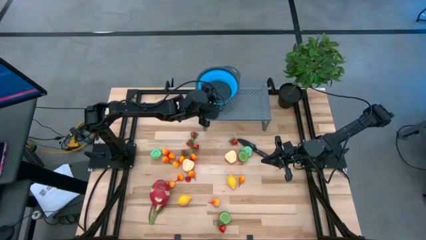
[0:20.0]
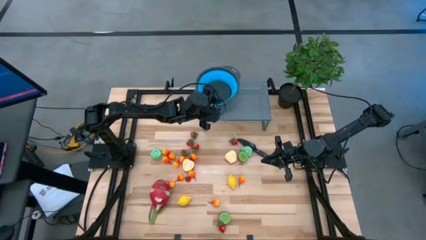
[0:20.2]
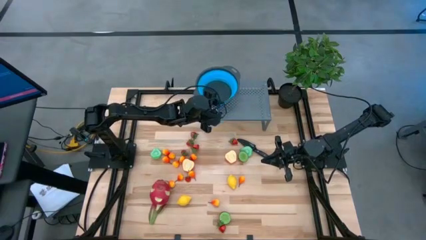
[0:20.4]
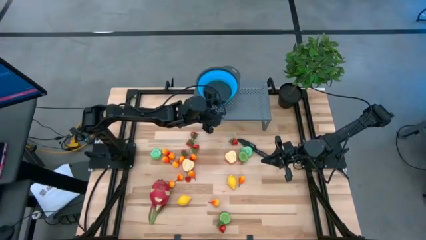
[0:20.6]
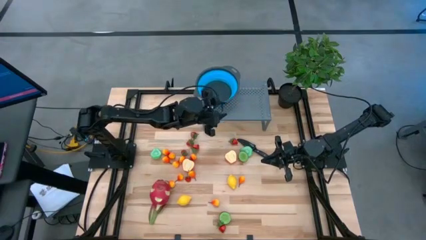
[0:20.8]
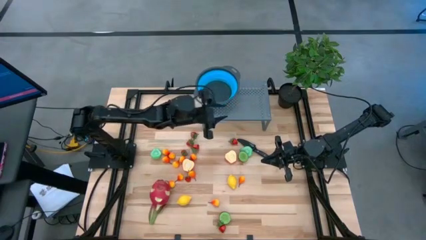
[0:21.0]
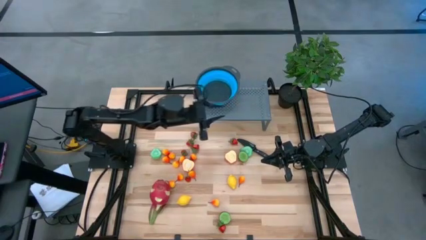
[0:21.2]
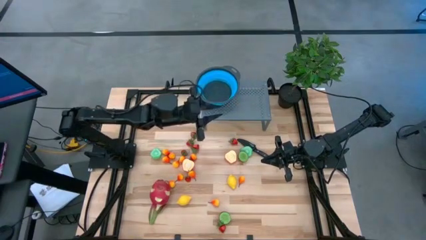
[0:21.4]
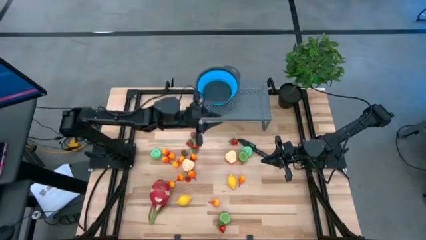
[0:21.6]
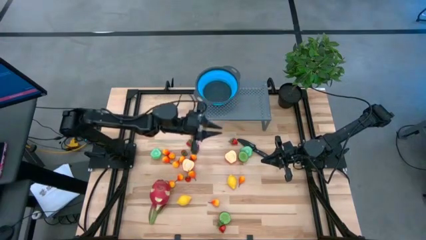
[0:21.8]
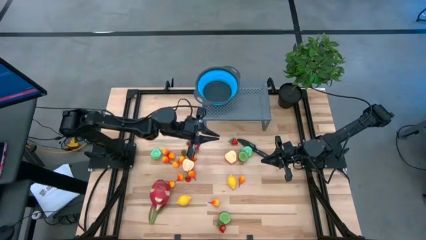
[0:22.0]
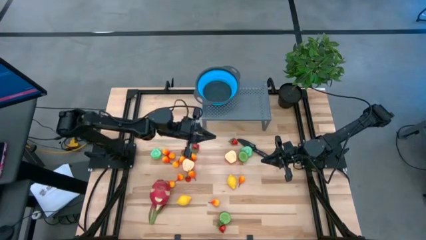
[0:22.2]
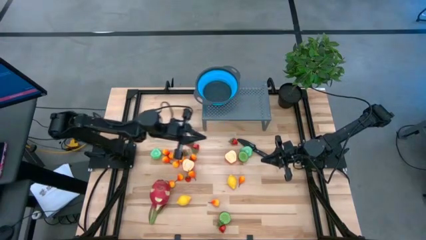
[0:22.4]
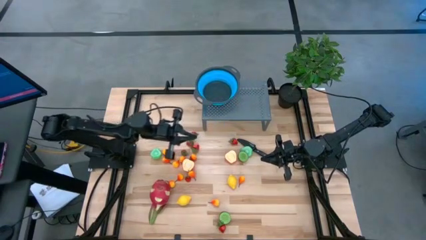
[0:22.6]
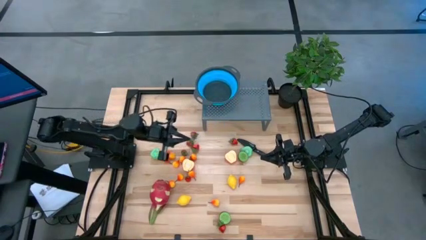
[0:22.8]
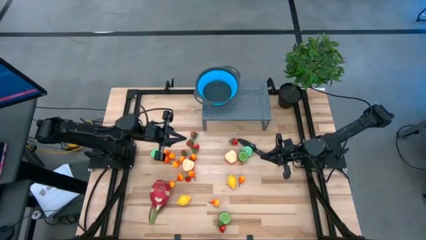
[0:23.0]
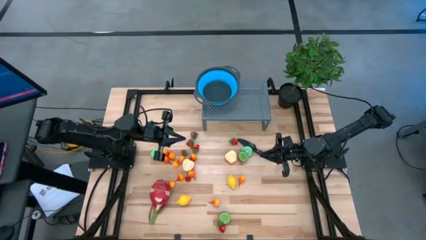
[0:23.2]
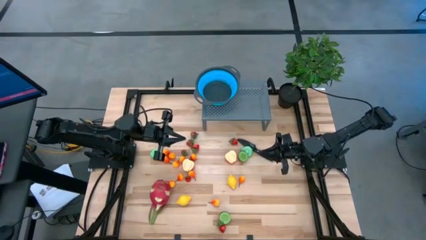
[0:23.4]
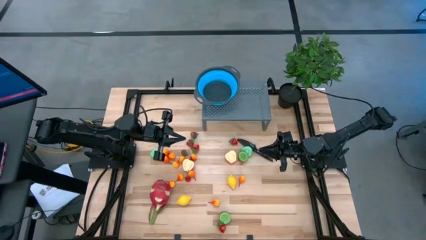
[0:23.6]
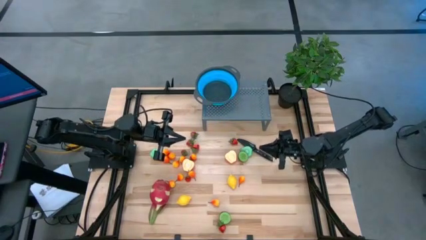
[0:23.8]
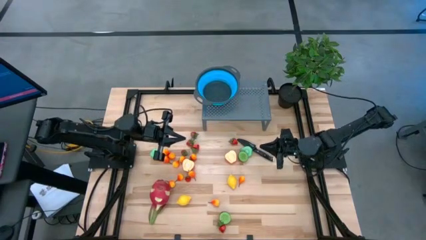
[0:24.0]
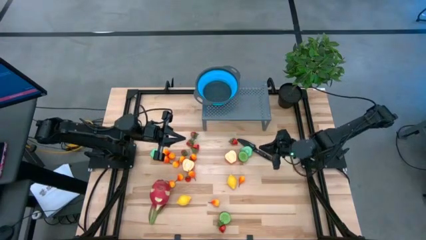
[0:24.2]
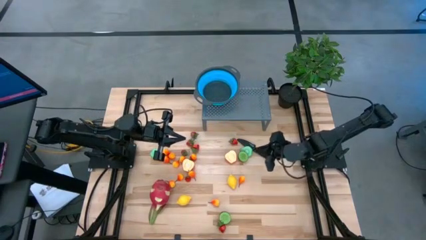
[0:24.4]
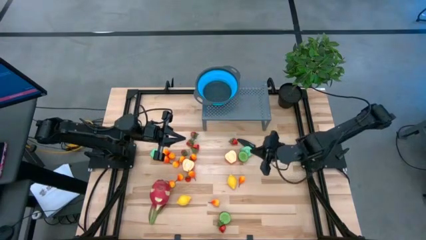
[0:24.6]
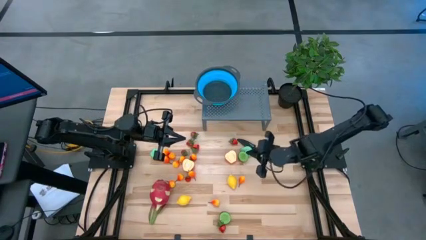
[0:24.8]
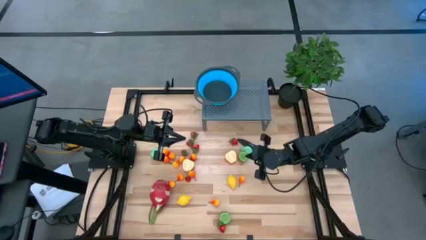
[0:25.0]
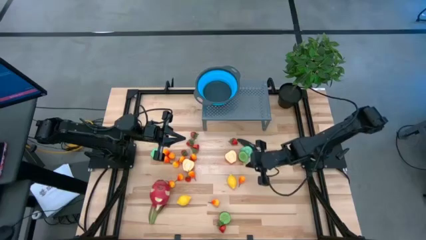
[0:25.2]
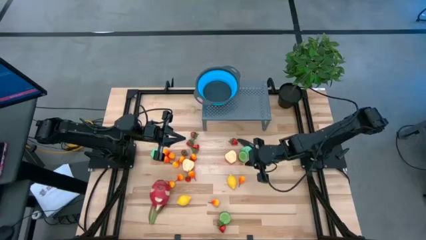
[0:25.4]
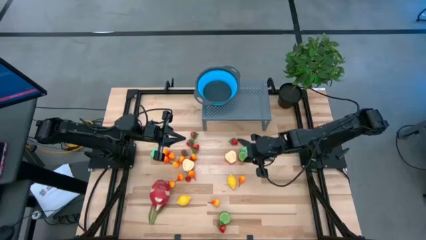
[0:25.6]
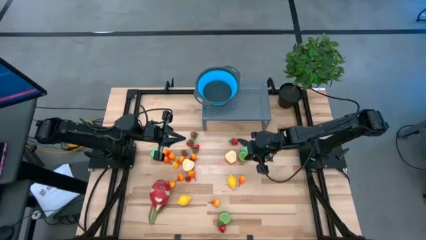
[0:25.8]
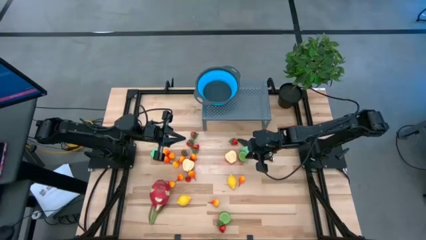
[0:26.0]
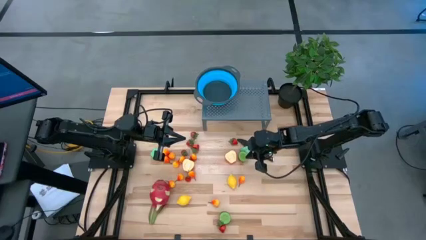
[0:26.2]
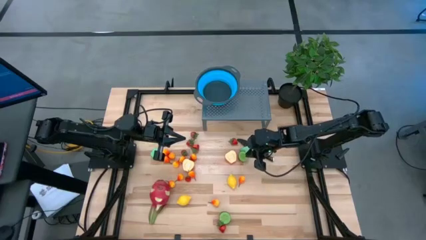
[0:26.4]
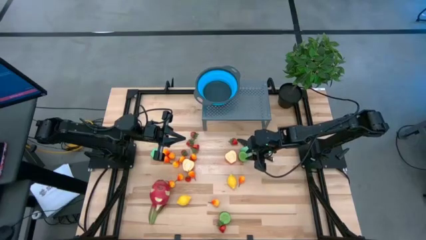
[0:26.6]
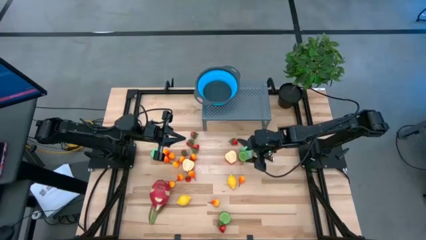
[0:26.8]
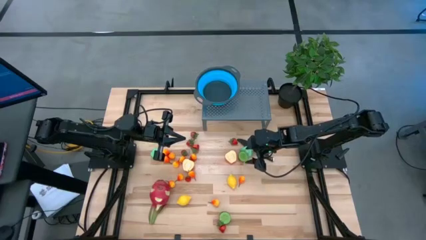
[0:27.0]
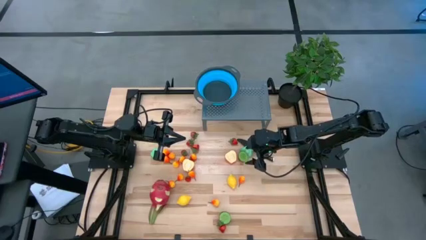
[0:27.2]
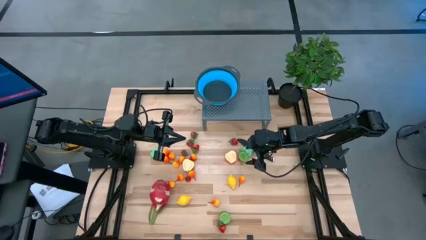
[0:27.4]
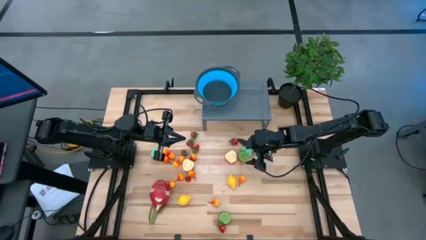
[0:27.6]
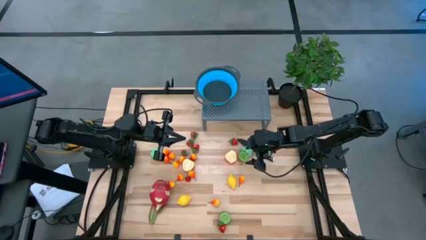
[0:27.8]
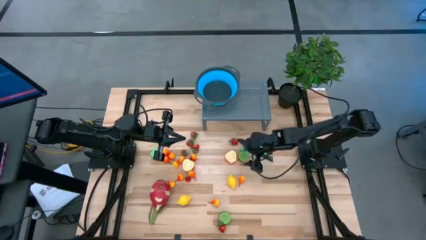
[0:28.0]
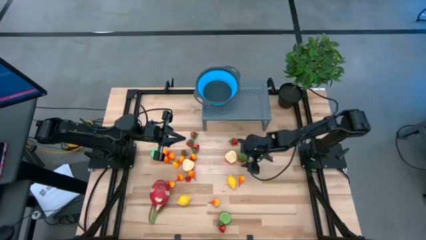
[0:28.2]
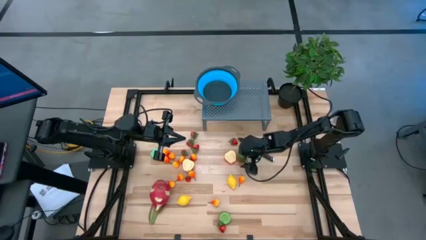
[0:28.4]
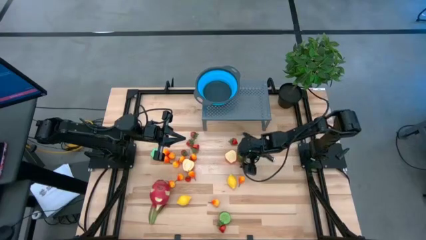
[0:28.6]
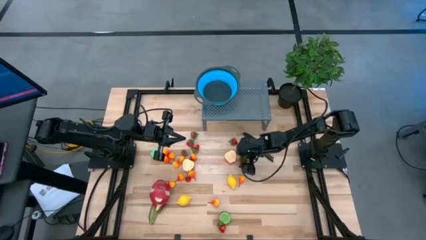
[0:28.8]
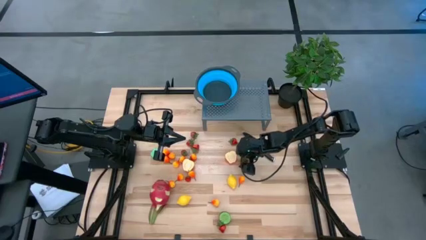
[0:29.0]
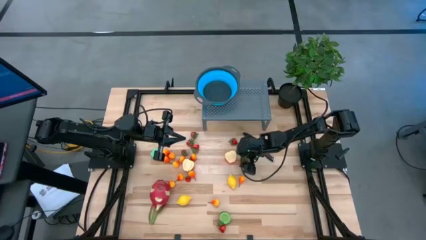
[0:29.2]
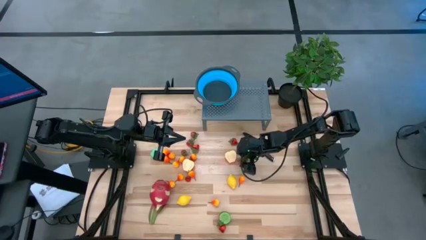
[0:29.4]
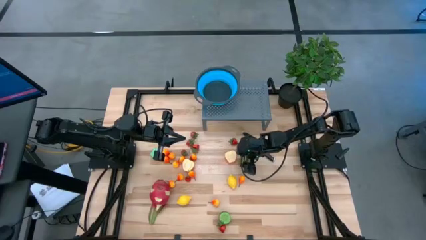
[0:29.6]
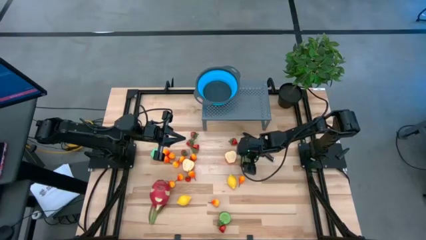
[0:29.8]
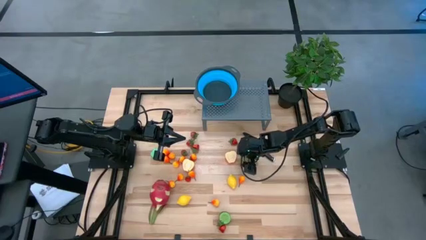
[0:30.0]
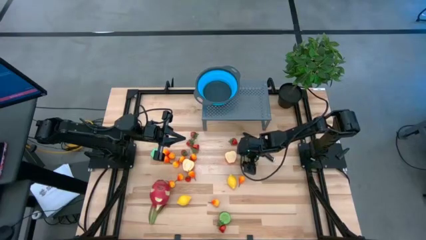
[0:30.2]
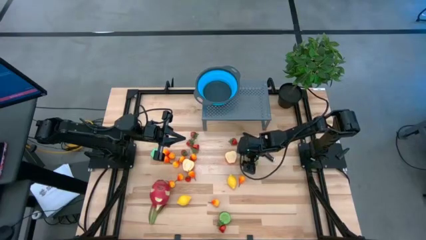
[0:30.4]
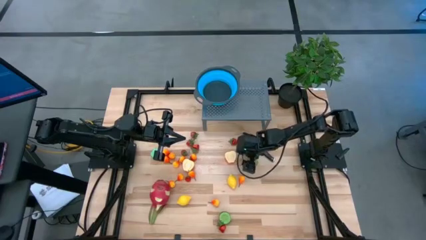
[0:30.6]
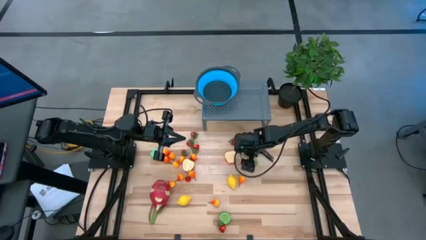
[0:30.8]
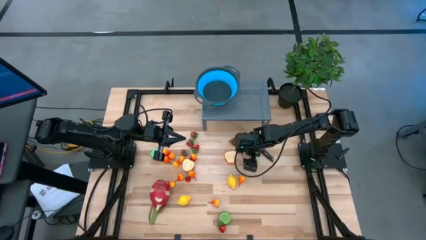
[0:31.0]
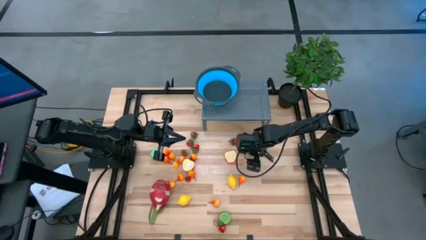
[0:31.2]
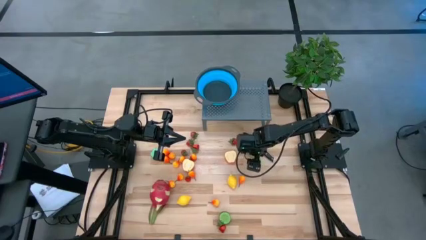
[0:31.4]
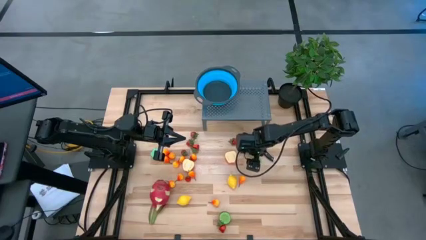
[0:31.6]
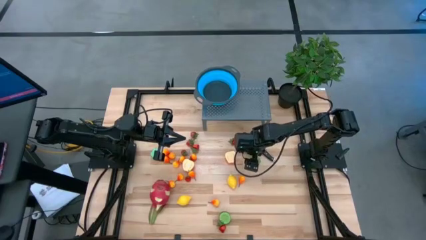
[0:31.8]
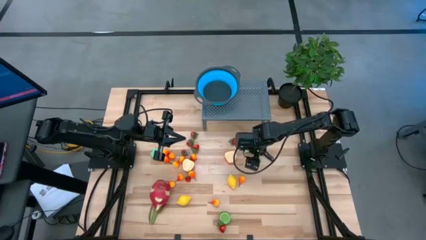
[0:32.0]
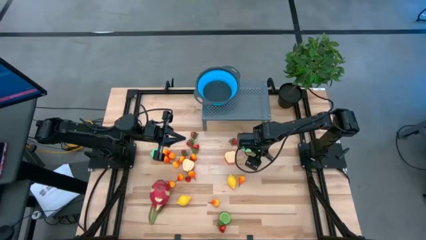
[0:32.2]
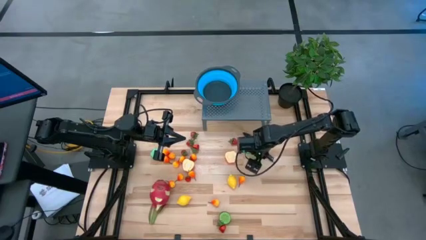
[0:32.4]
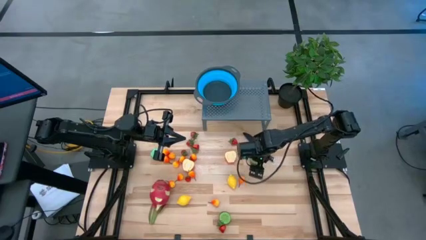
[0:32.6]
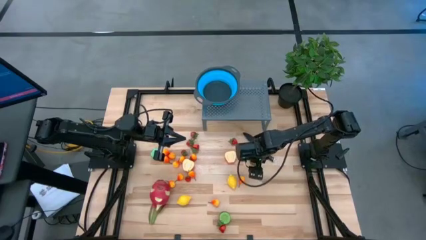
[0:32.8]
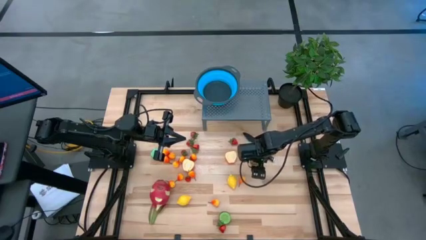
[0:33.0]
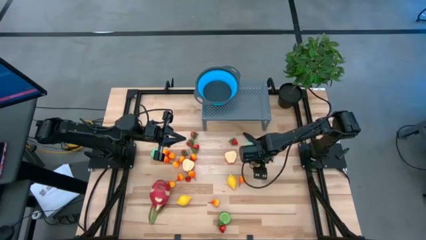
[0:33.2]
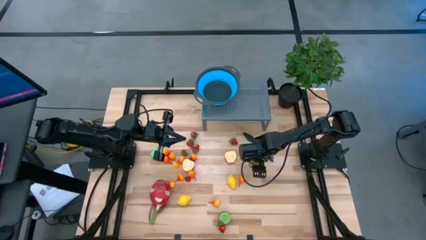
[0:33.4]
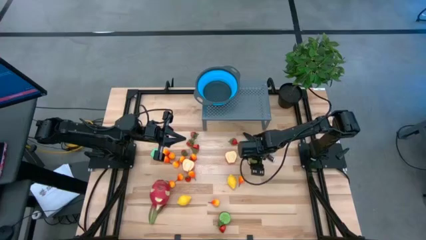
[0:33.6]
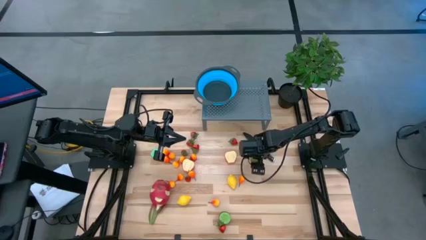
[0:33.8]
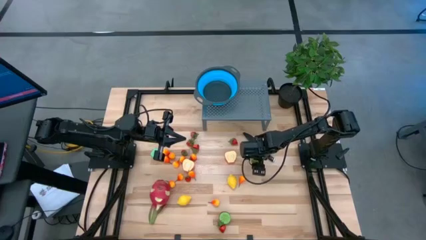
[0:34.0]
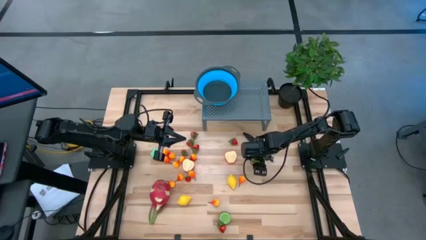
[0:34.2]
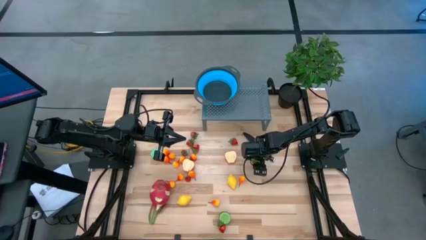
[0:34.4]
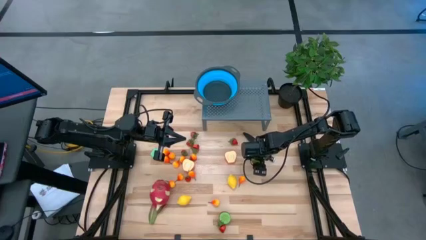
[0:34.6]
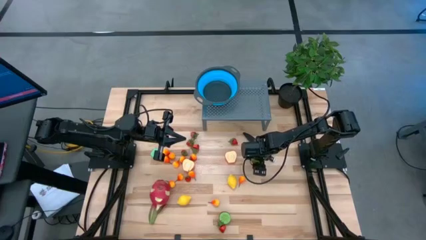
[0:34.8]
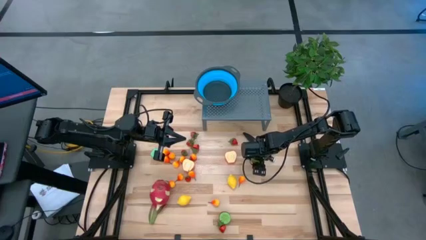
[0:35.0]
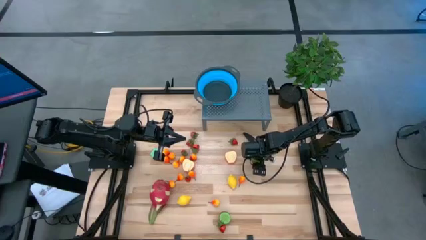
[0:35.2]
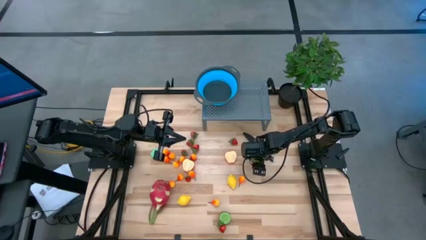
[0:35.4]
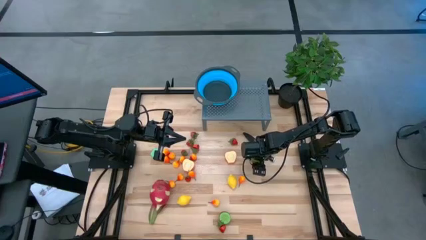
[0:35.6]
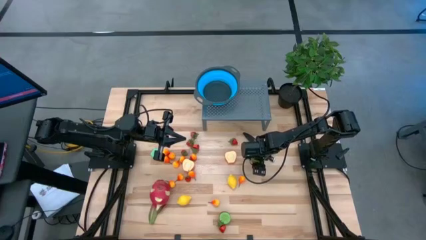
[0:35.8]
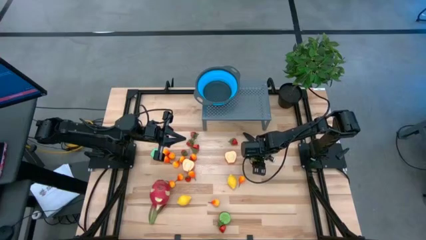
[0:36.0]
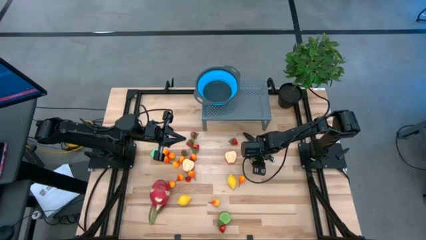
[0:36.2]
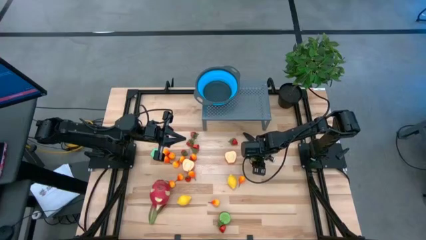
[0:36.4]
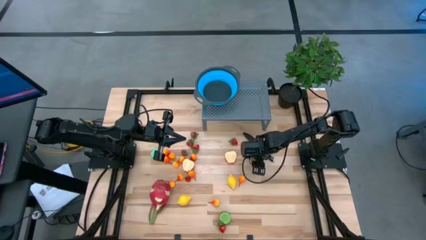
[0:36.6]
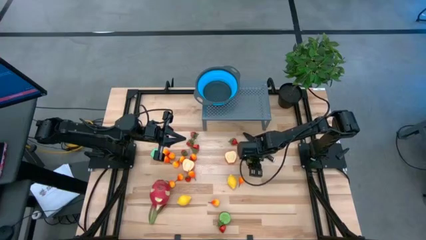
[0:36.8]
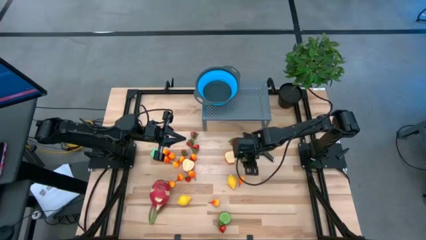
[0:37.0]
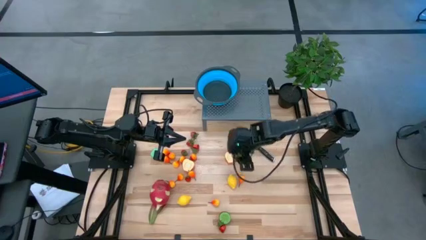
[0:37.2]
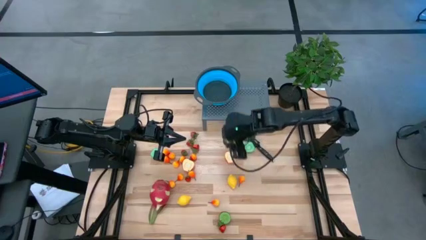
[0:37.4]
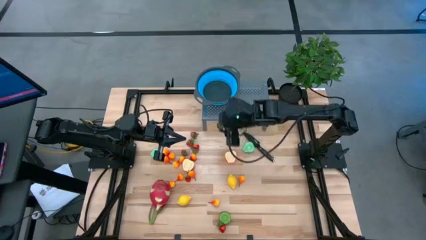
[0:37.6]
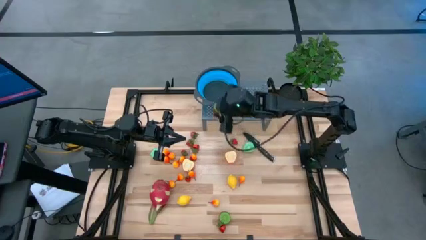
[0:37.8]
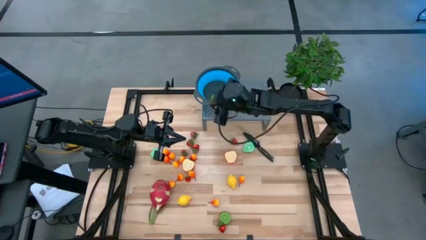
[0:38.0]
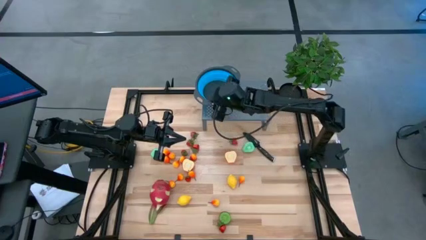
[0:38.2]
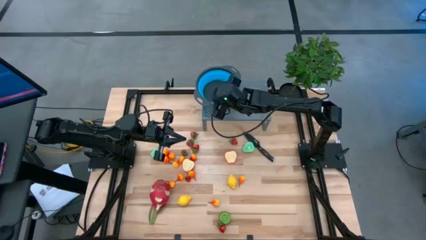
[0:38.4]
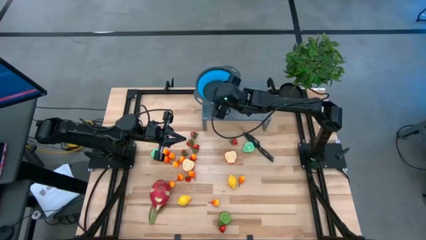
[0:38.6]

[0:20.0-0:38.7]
Task: Pick & Place Fruit
Put the top kiwi into the strainer bowl
